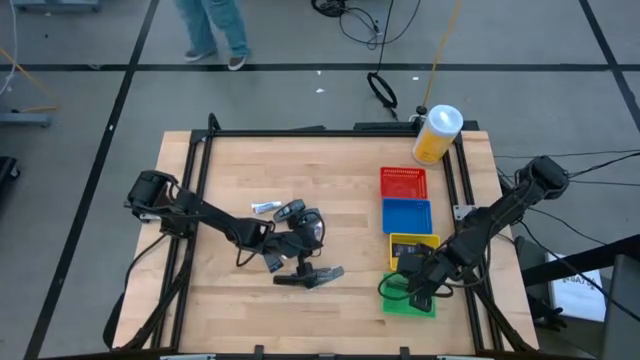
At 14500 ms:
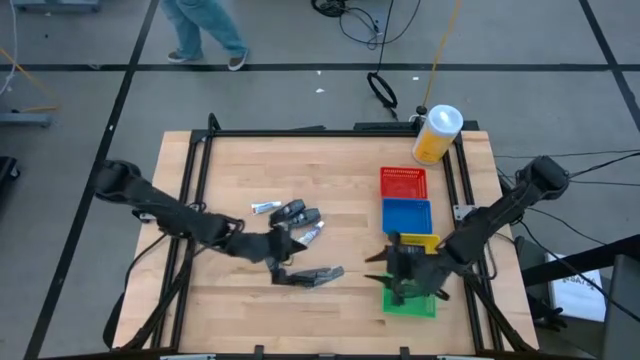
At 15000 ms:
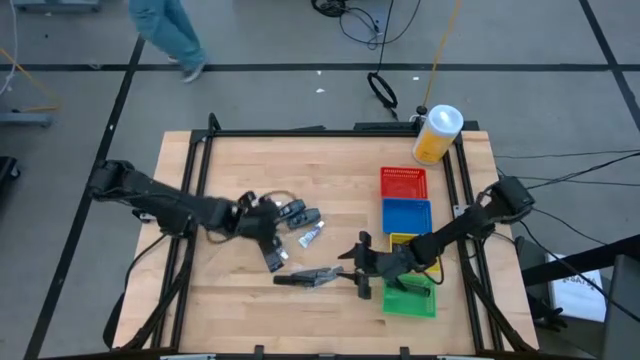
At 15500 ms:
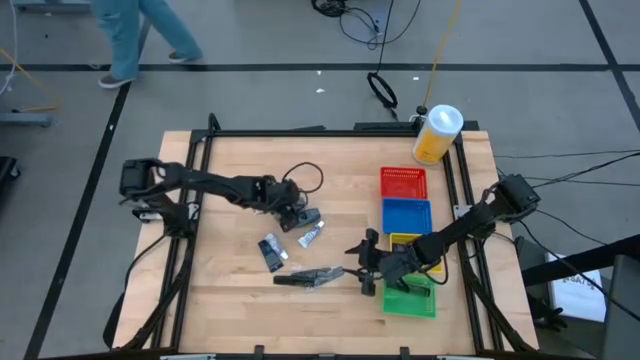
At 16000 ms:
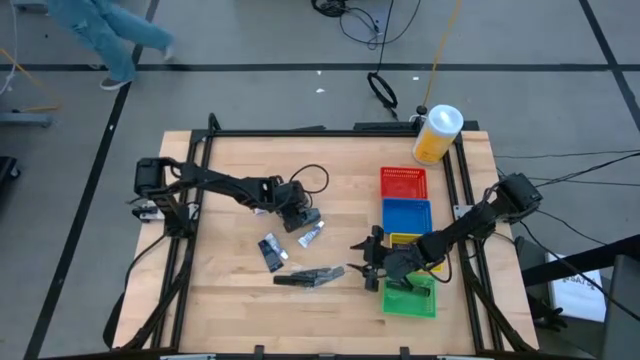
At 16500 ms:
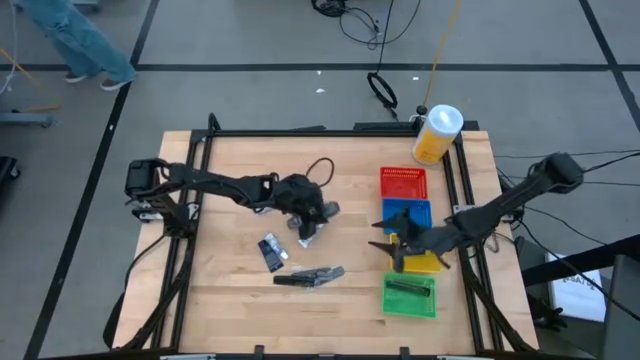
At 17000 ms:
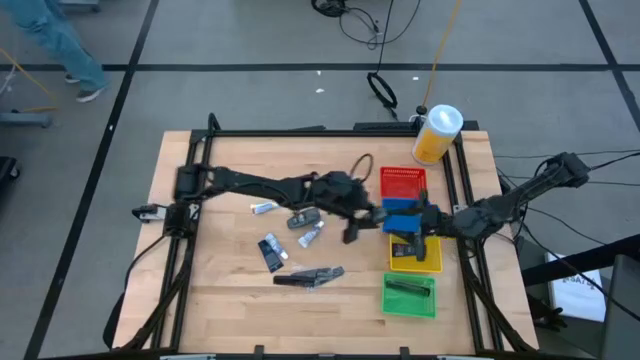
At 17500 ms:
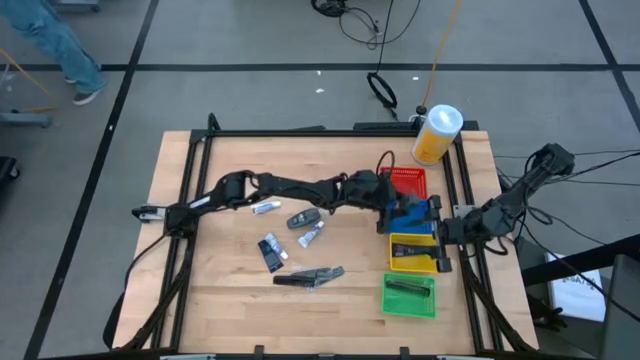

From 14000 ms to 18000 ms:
Task: Pick & Place Travel size toiletries
Put the black deodorant into the blue bin

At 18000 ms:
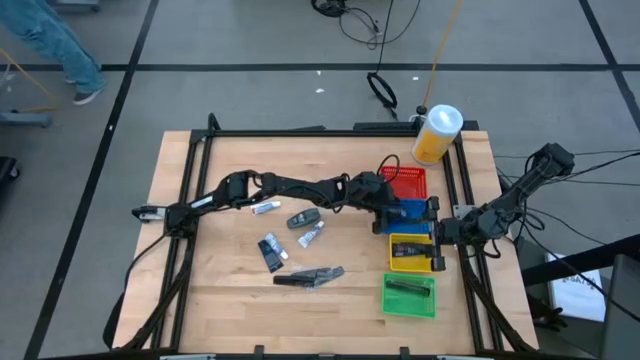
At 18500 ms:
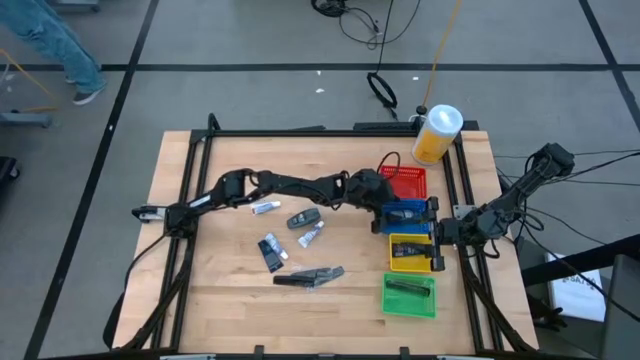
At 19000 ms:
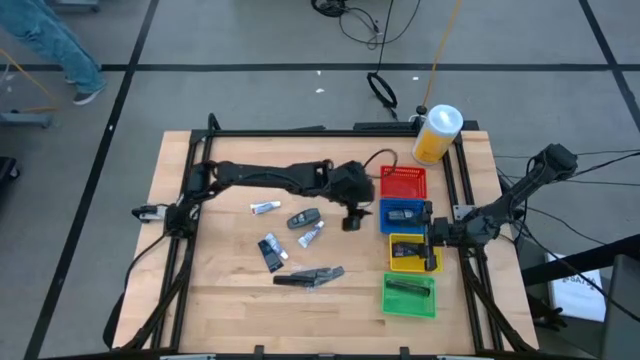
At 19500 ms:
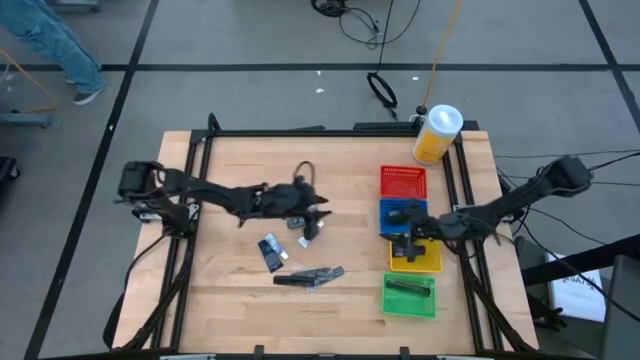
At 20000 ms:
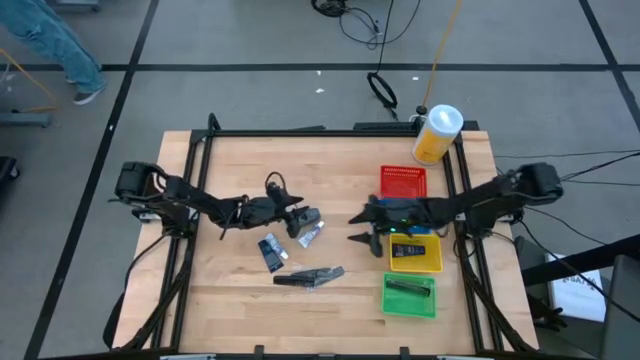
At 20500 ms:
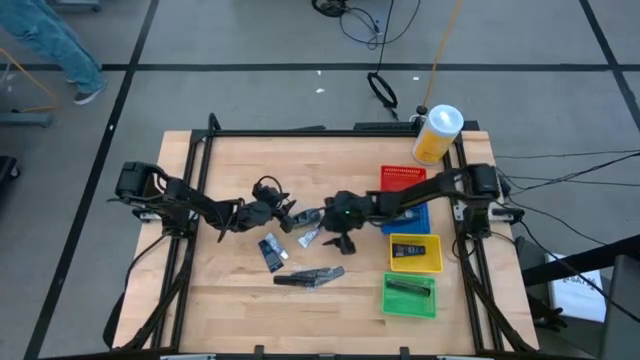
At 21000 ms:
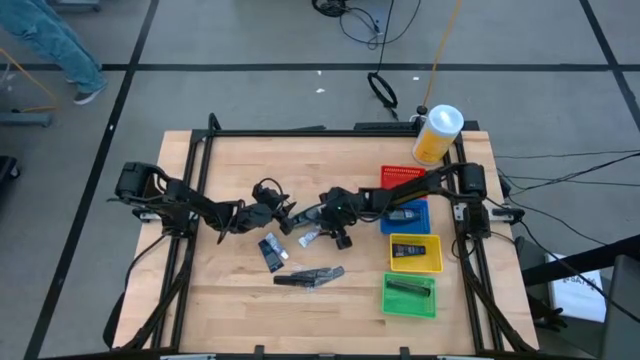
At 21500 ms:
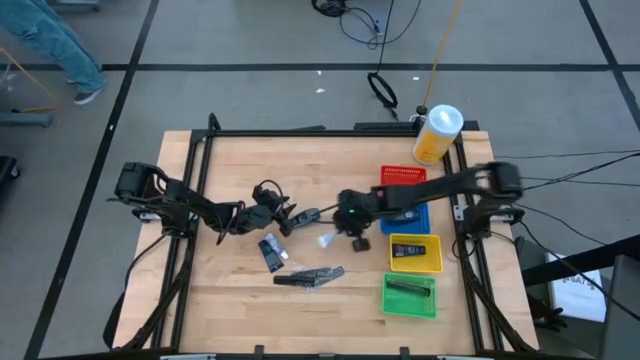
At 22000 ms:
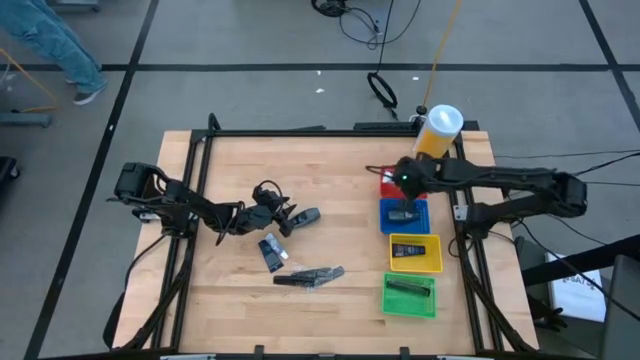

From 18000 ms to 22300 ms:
Put the white toothpaste into the red bin

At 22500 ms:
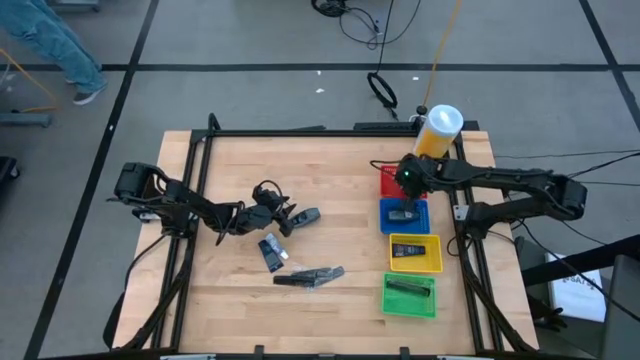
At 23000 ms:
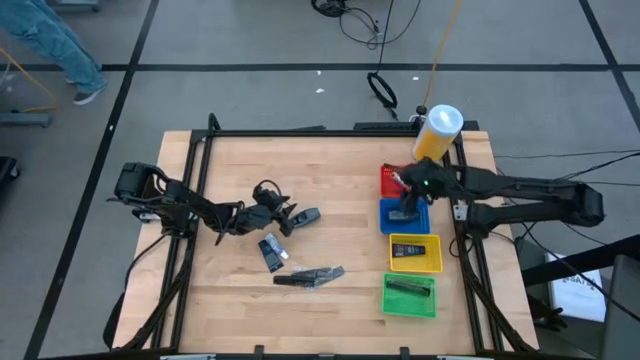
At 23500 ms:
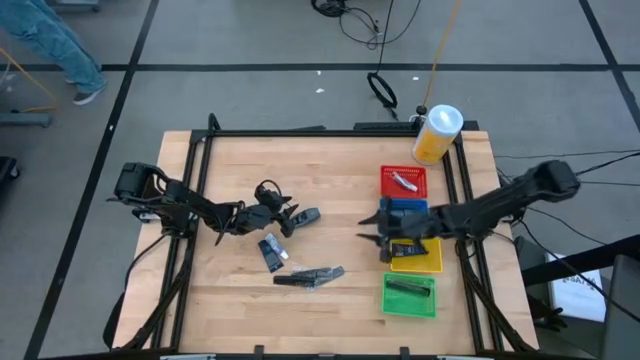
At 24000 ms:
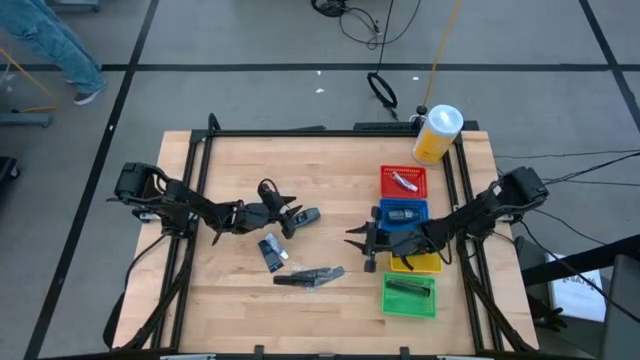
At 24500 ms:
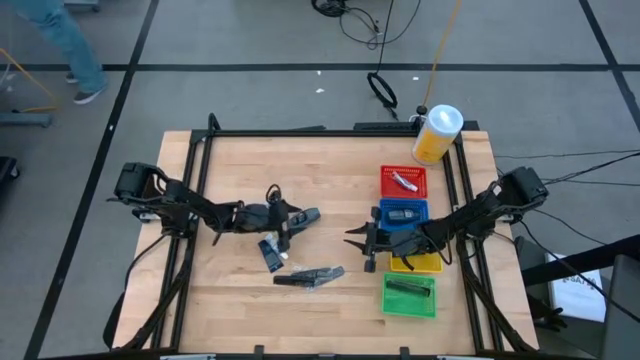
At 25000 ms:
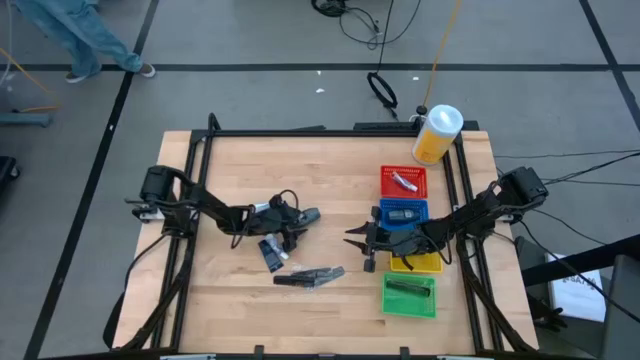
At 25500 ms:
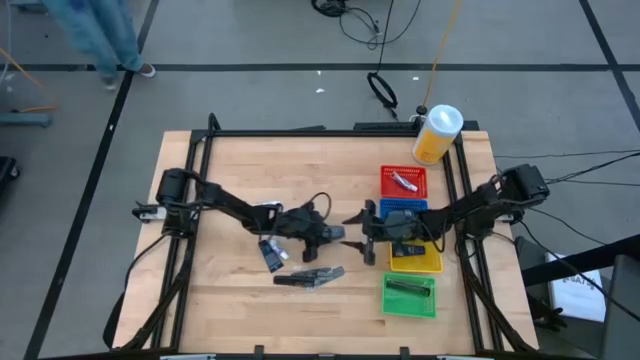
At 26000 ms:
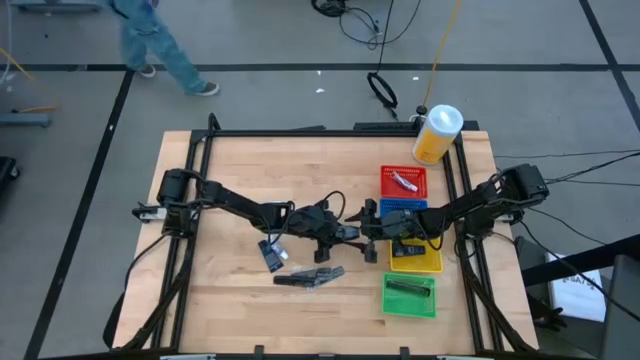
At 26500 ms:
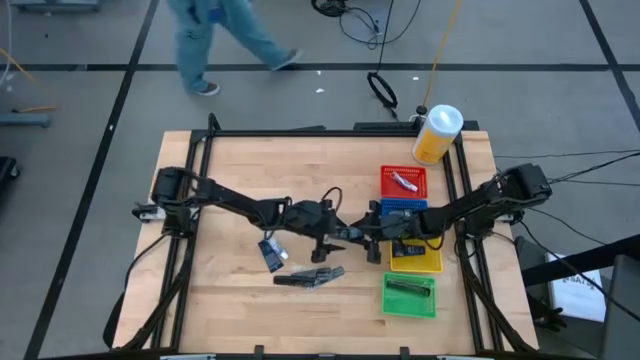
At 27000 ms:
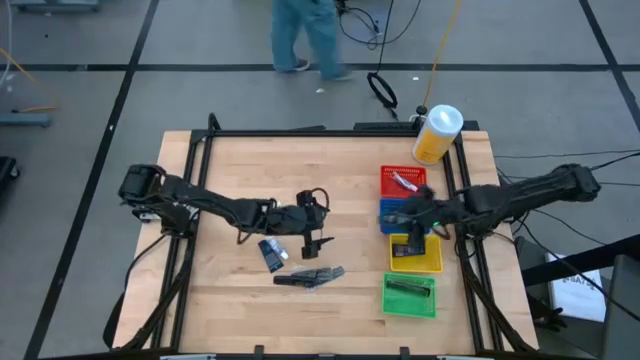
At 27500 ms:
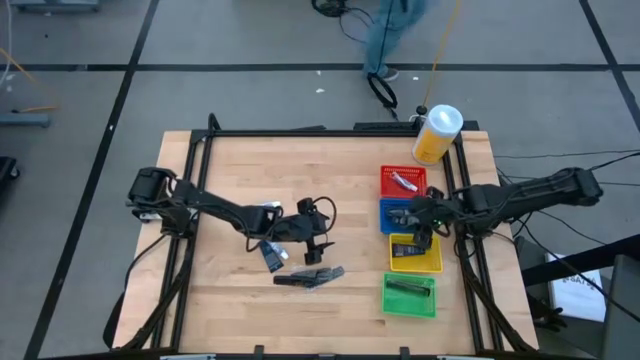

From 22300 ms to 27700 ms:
Put the black deodorant into the blue bin

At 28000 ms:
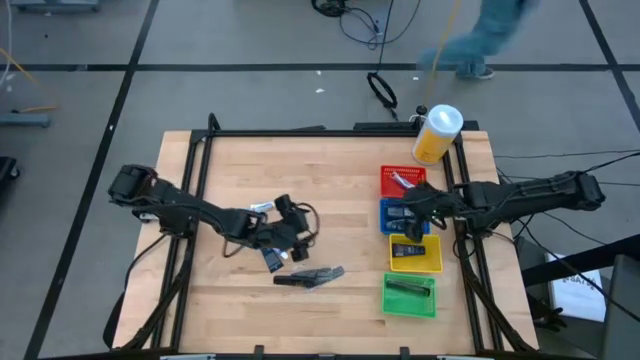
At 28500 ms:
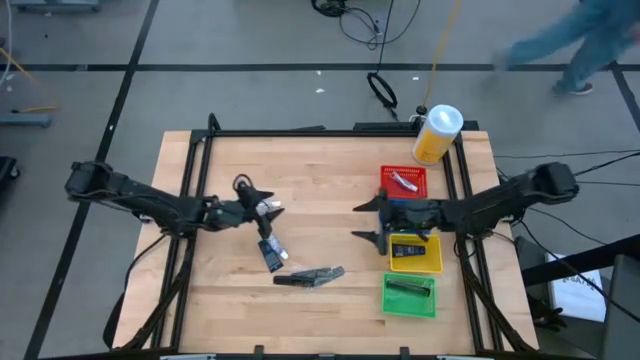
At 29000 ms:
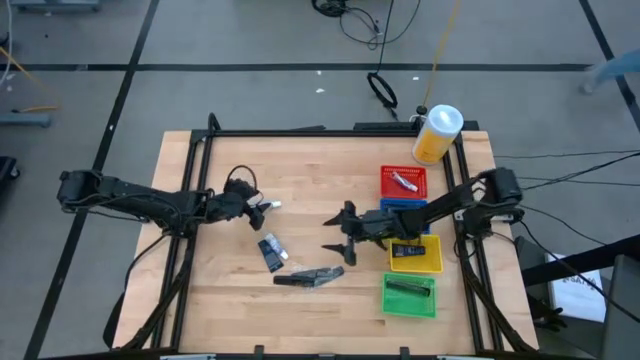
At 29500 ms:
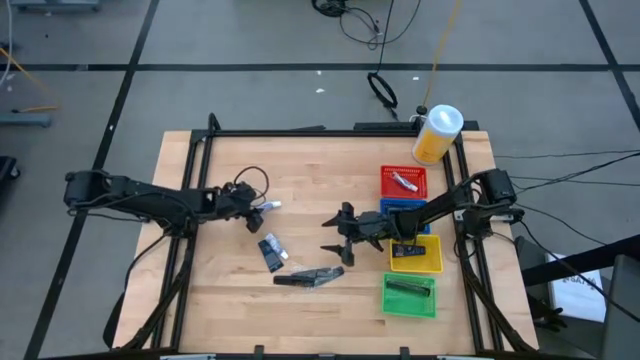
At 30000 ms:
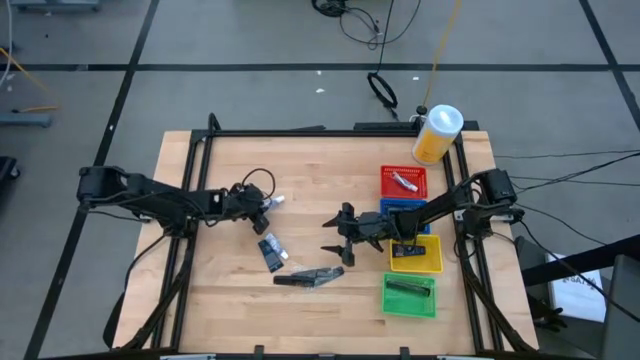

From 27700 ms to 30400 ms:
Put the white toothpaste into the red bin

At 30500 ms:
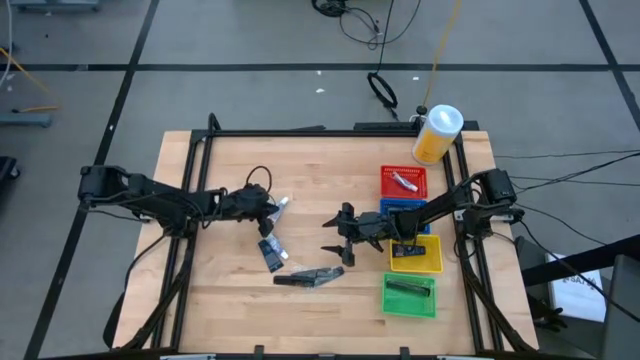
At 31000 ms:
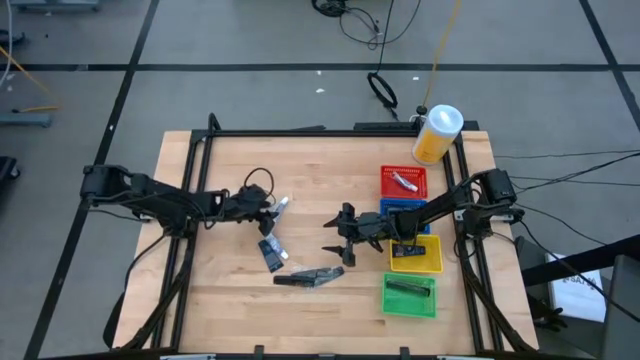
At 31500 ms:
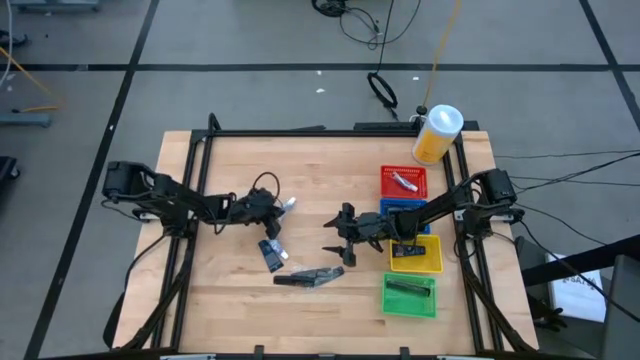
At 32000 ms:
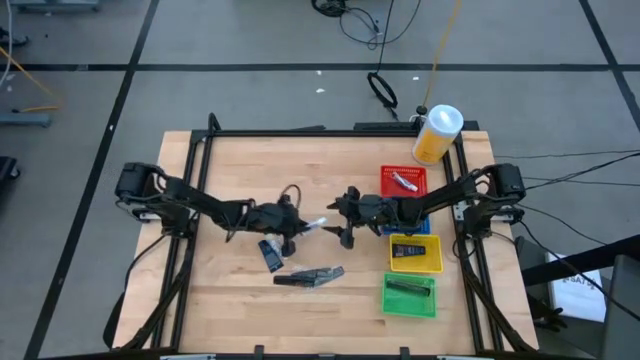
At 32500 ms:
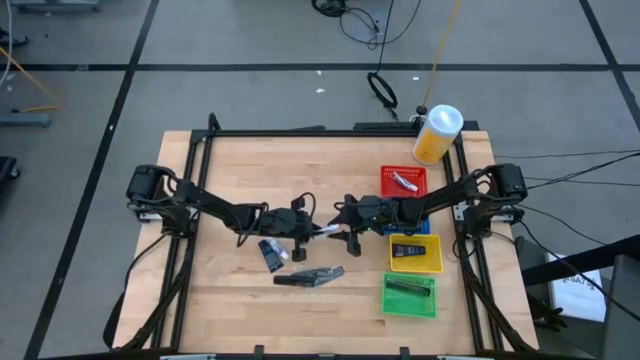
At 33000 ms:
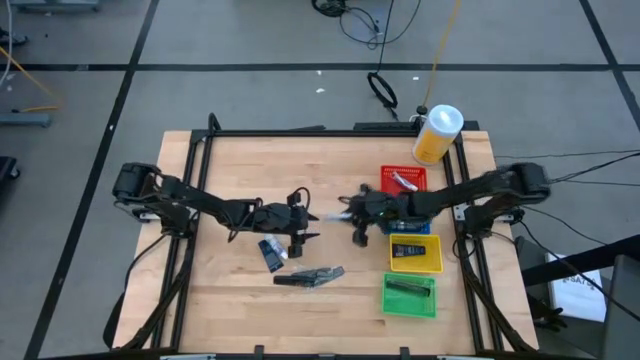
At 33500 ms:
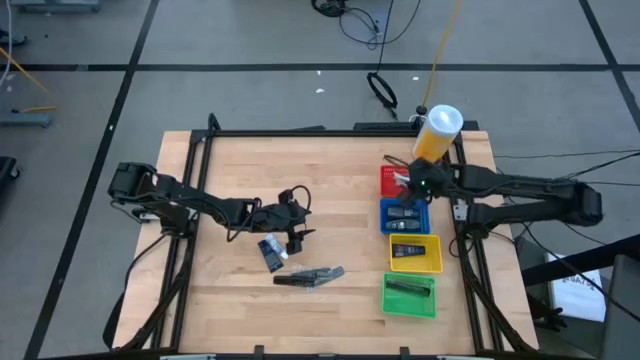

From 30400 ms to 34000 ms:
Put the white toothpaste into the red bin

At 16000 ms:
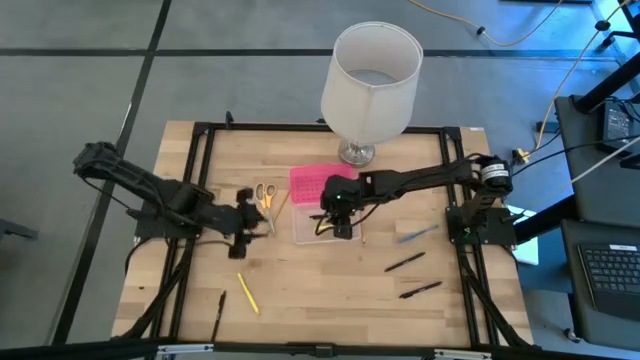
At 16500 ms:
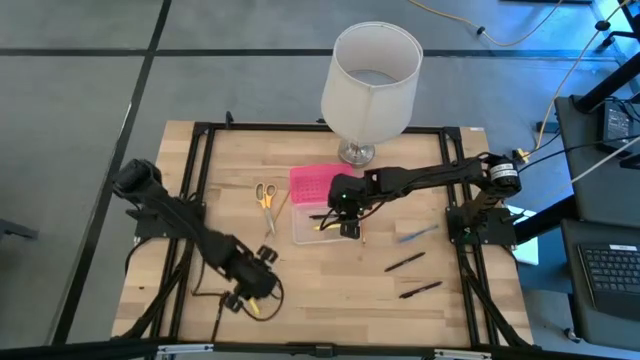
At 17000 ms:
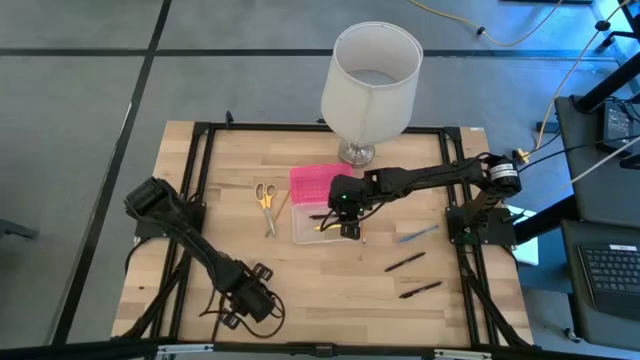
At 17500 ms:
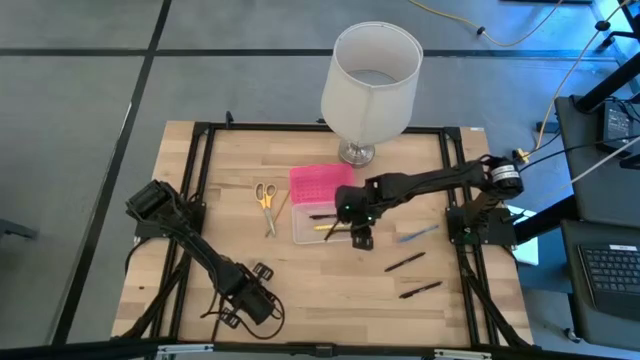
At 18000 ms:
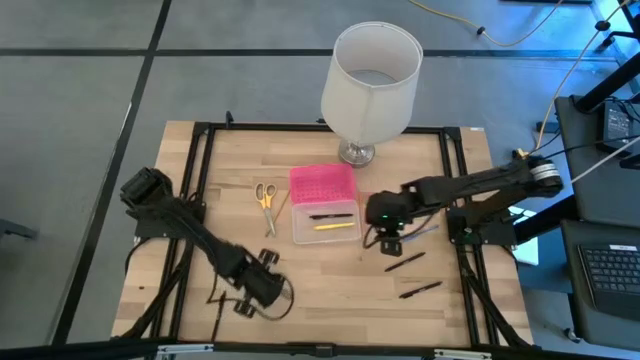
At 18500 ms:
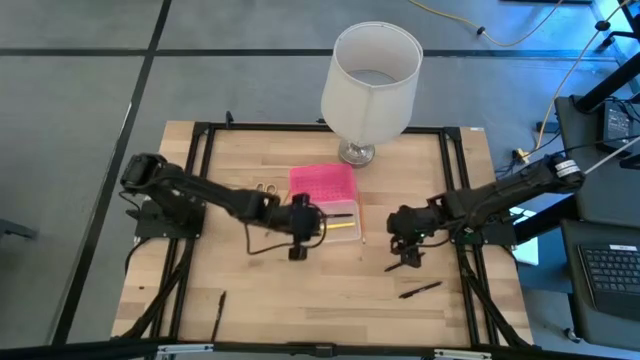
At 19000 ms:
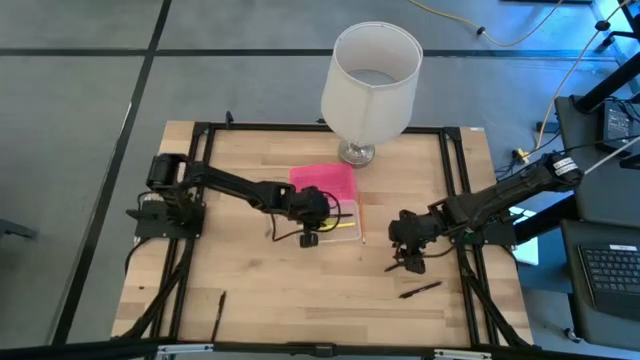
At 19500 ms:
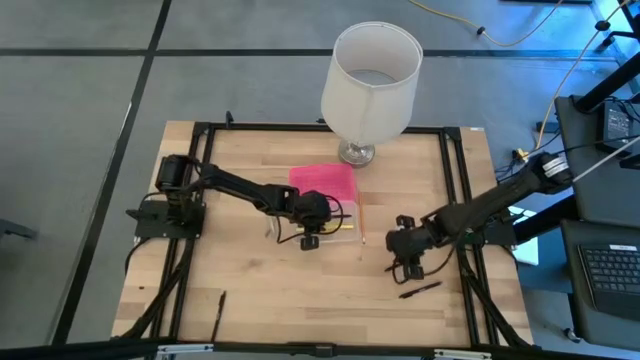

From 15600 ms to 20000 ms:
Task: Pick & place school supplies into a supply box
Put the yellow pen into the supply box
